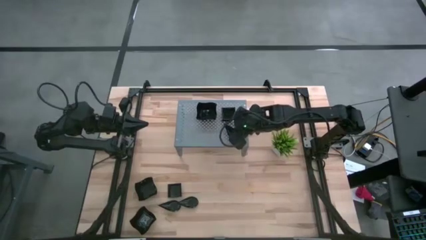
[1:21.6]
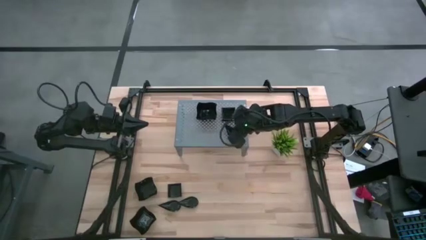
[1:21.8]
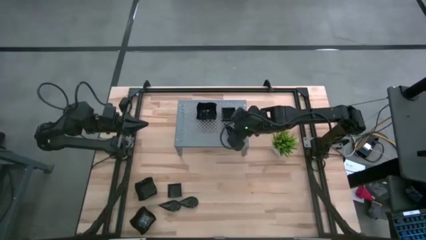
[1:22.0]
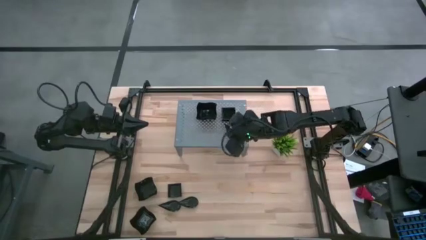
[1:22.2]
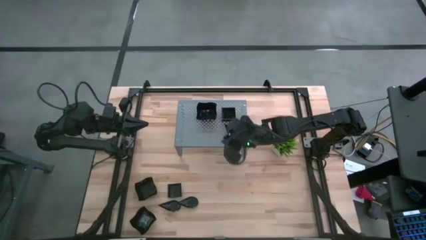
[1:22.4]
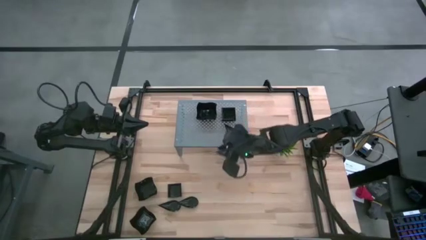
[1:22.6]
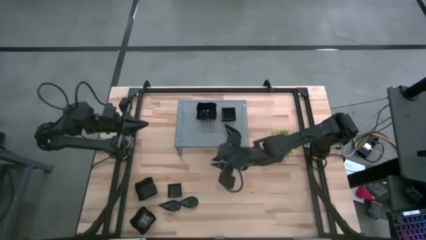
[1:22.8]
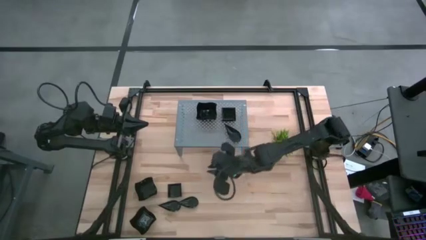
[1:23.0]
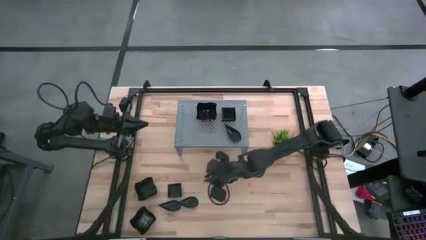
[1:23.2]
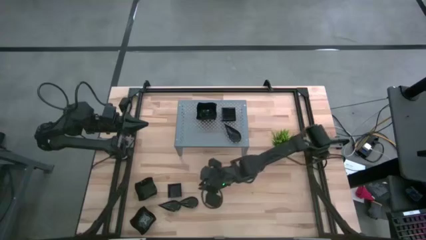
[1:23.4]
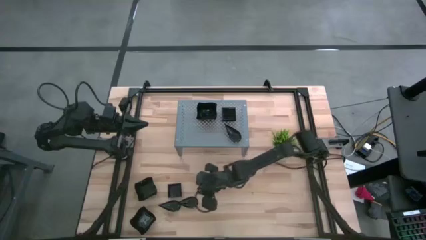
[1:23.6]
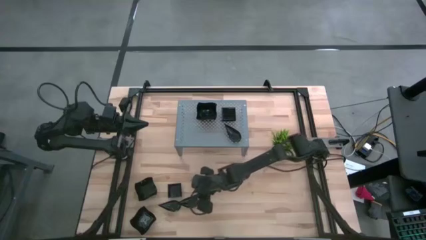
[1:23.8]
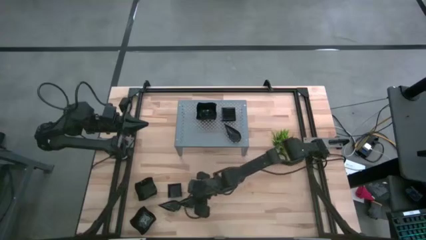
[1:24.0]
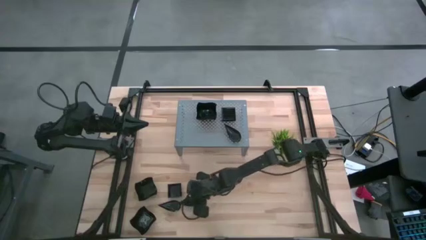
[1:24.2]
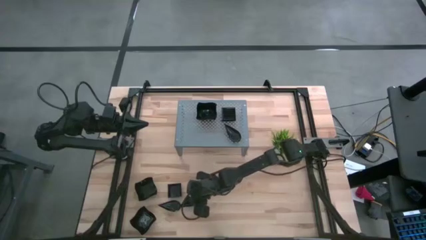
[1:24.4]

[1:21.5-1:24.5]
Task: Pick & Place Mini shaped plates
Stack the drop-shaped plate on top of the drop-shaped plate on the shelf

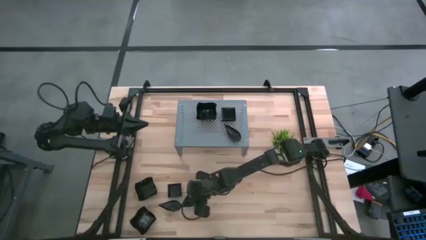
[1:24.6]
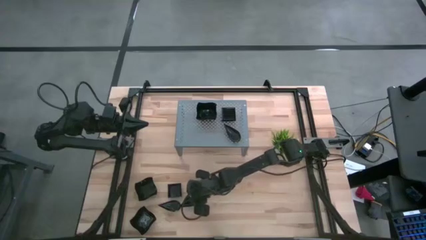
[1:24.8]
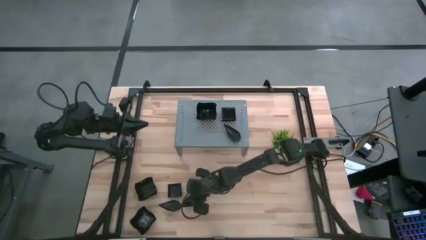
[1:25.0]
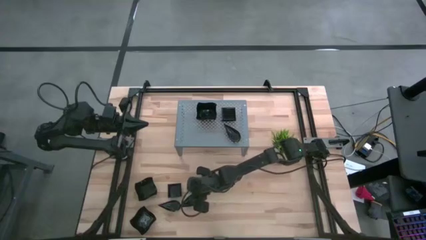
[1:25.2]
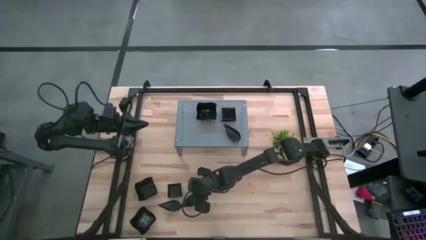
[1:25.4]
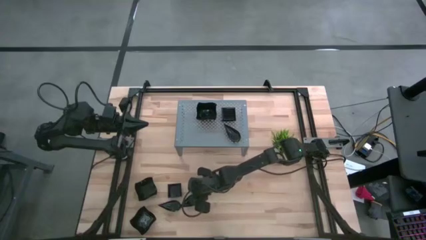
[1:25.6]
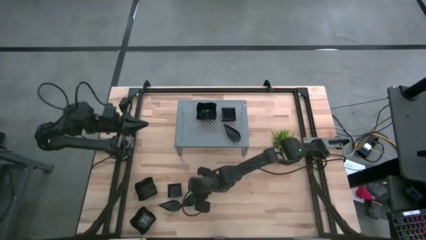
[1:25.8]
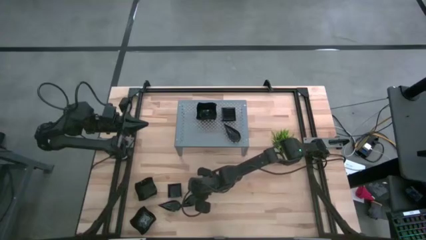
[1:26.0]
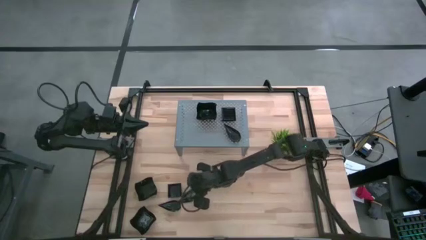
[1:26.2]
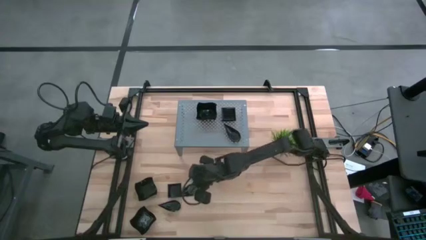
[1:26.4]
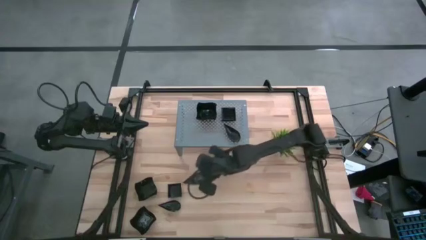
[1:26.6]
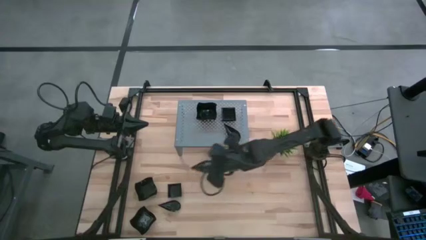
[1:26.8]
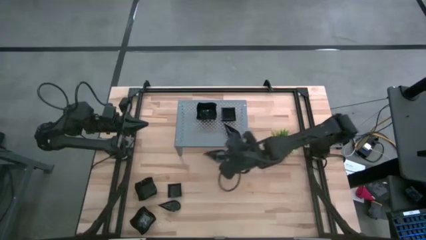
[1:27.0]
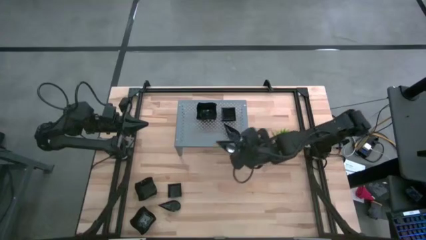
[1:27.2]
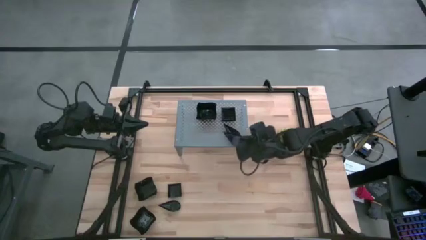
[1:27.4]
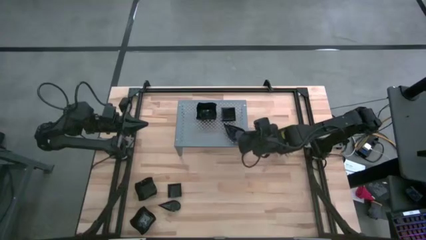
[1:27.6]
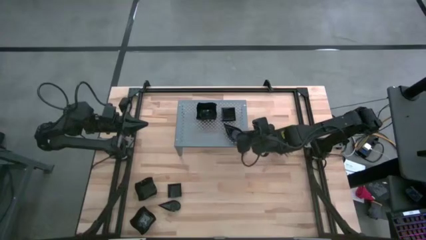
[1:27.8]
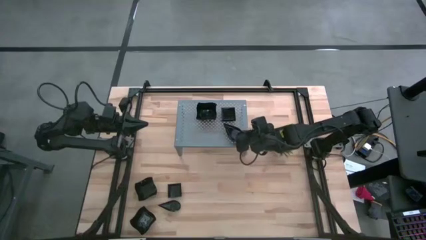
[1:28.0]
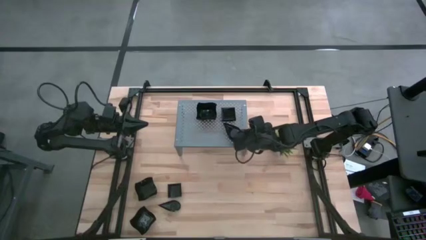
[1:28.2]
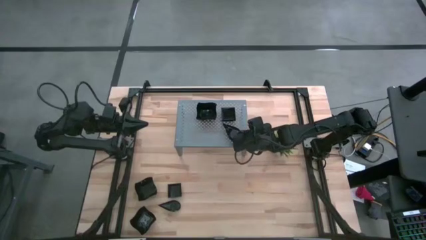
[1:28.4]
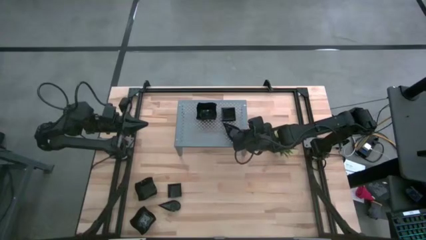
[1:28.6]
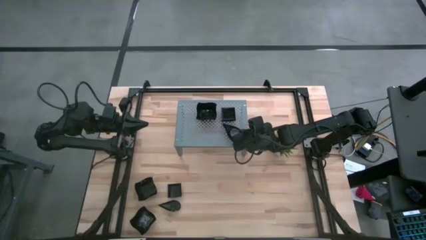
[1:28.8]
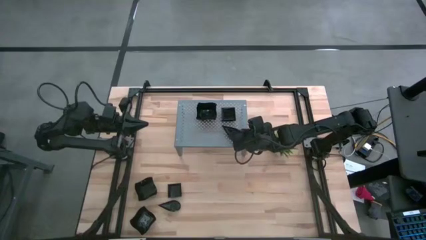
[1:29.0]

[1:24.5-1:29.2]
Stack the drop-shaped plate on top of the drop-shaped plate on the shelf

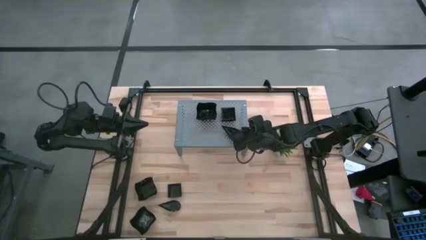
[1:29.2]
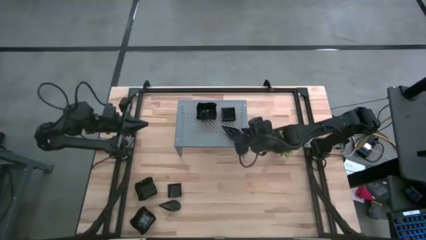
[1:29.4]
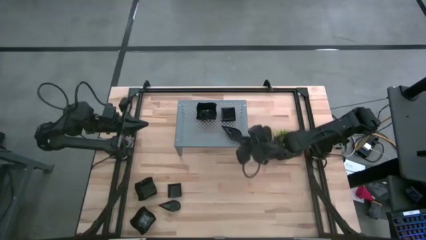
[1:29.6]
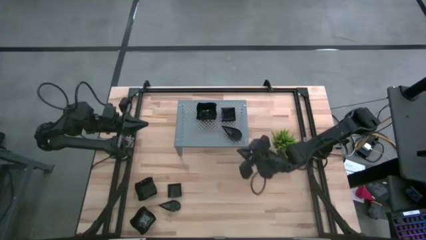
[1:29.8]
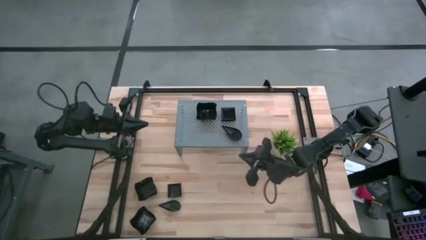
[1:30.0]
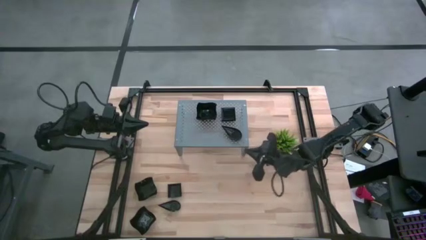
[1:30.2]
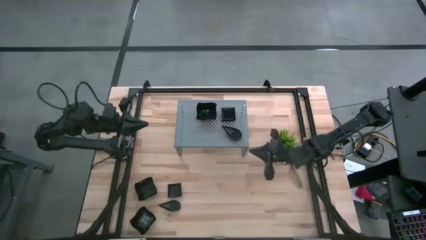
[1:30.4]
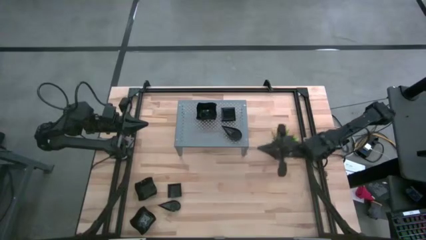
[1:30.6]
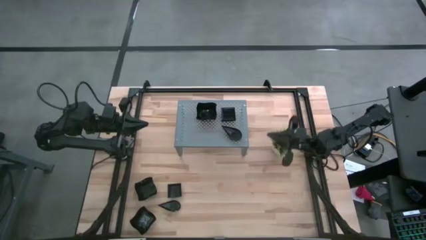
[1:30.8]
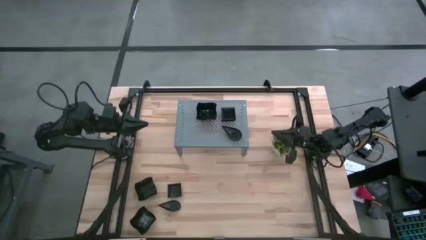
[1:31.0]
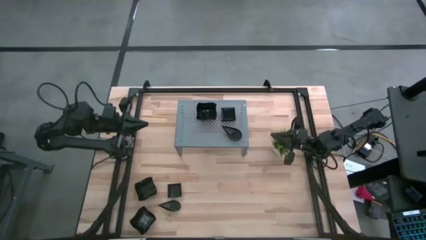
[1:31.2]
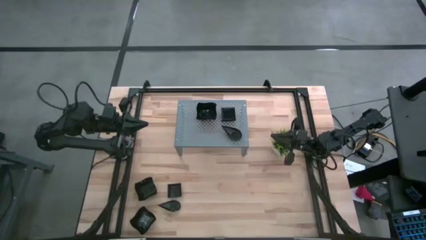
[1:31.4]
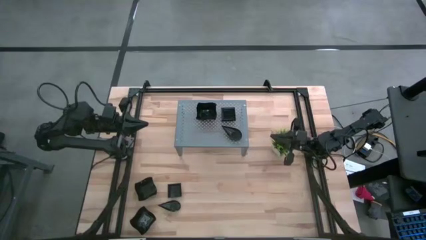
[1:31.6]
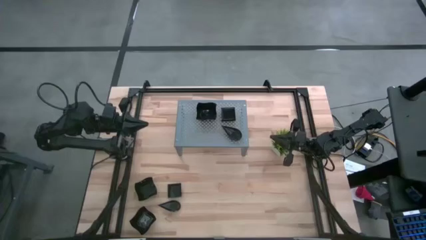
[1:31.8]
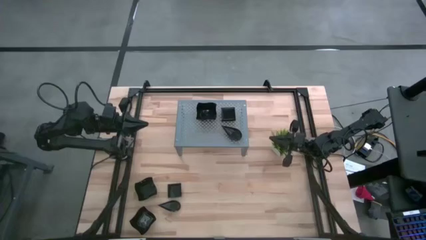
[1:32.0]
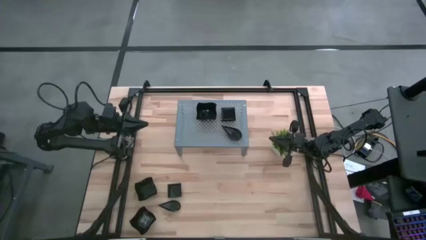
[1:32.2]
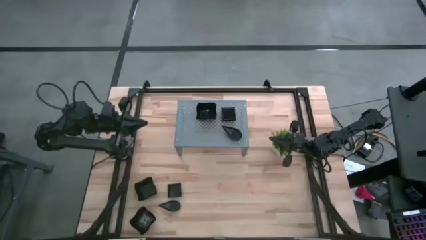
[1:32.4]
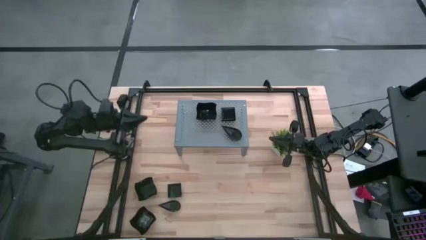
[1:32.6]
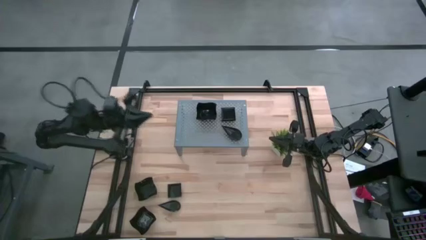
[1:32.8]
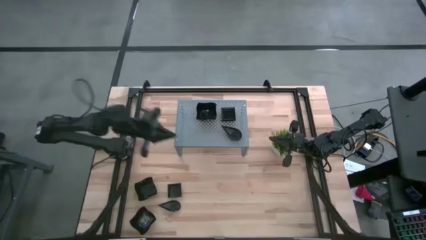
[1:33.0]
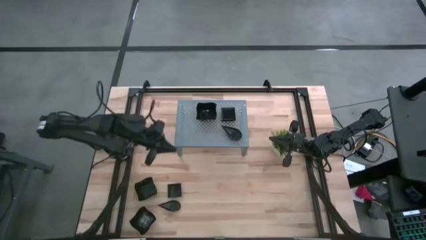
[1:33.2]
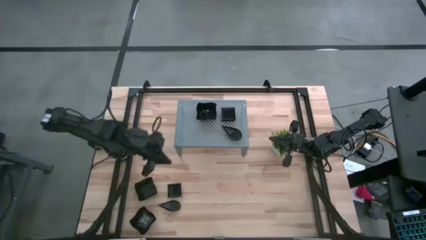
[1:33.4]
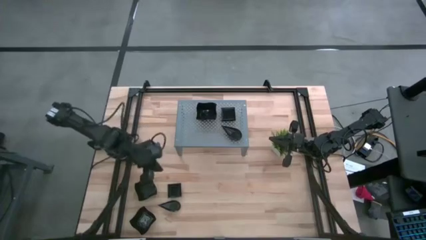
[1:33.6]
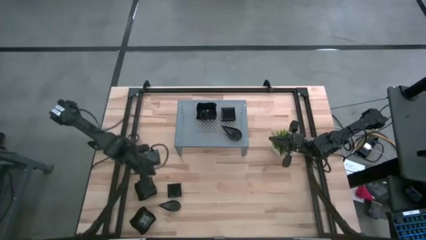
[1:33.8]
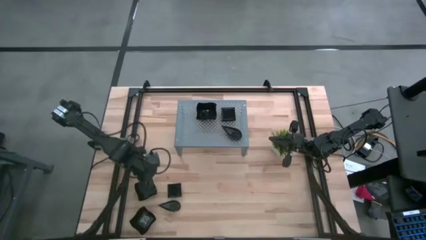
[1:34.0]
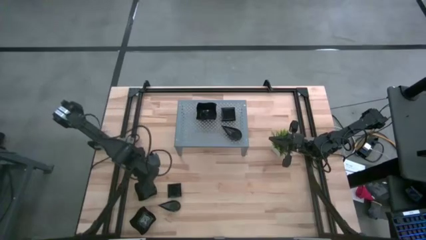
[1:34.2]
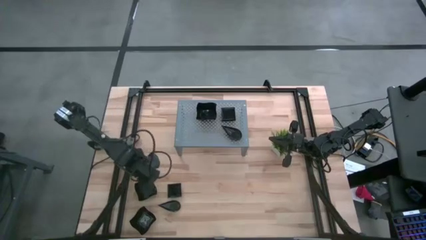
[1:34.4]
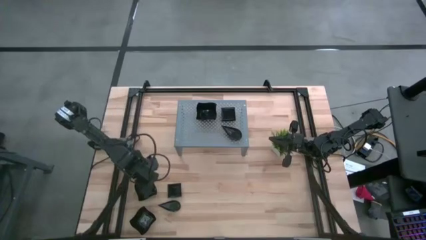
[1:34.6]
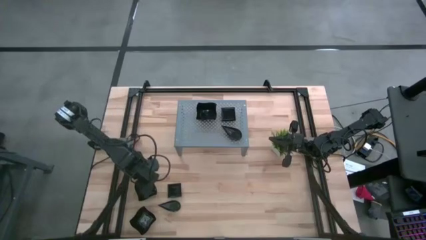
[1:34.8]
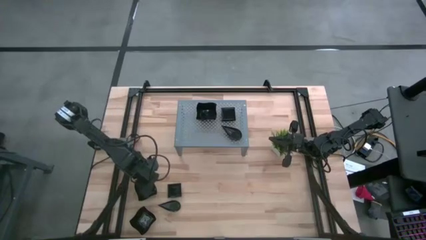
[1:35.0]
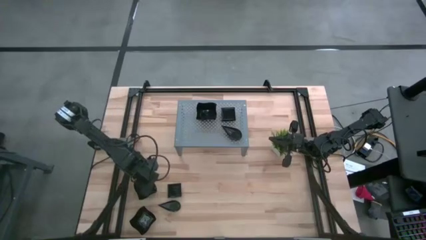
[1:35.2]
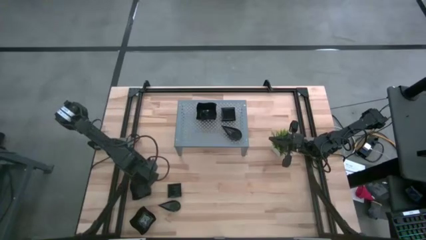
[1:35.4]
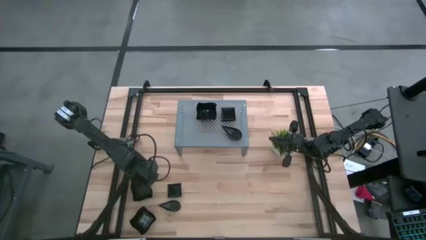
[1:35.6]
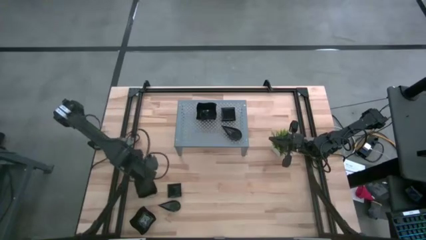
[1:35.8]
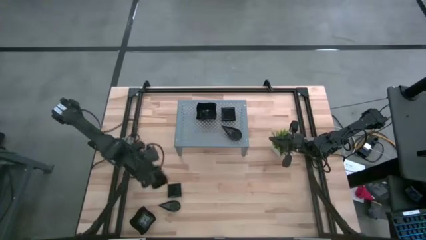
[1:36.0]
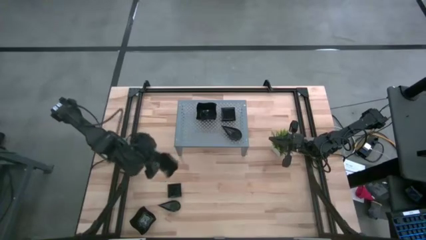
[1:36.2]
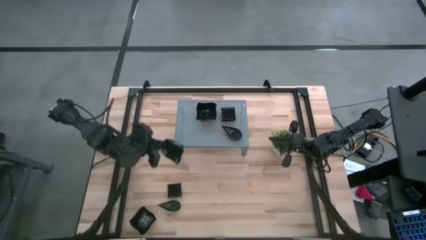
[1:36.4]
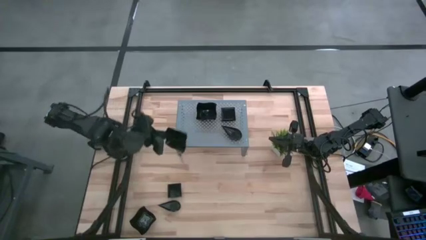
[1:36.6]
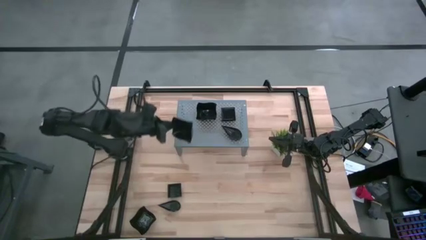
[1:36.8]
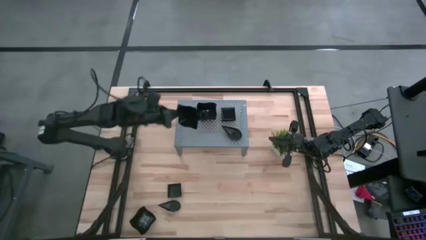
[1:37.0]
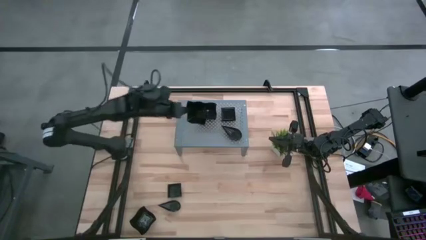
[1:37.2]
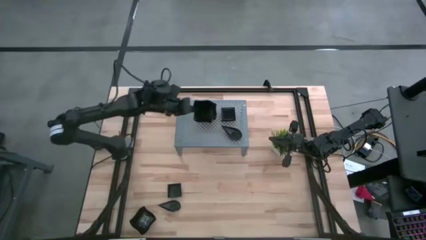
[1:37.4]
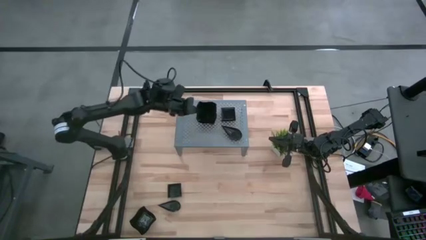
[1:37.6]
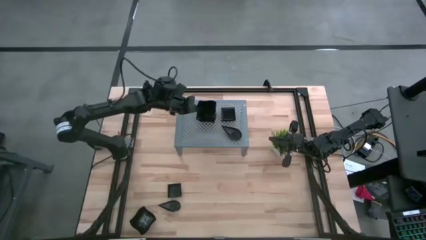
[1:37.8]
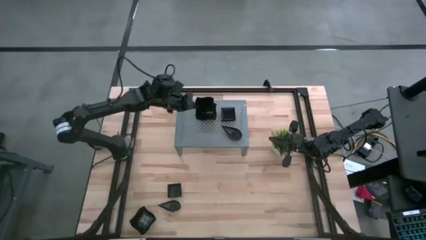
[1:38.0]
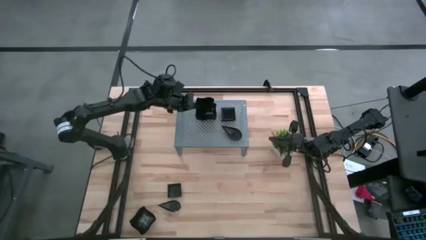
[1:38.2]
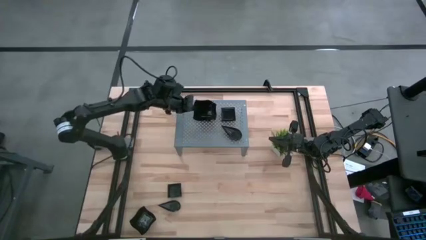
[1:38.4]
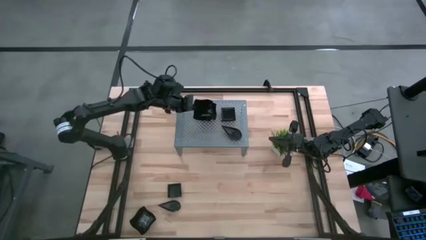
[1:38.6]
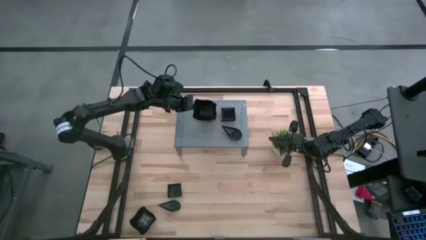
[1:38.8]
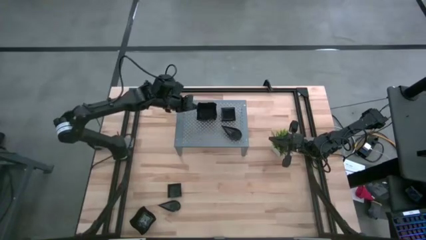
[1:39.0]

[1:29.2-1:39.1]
Stack the distorted square plate on top of the distorted square plate on the shelf
